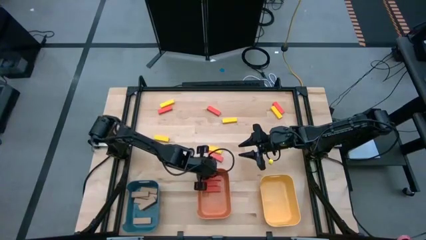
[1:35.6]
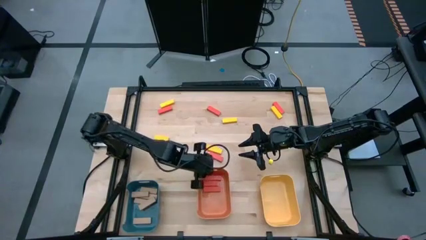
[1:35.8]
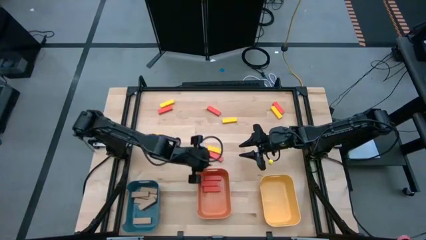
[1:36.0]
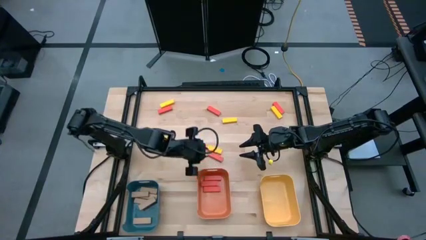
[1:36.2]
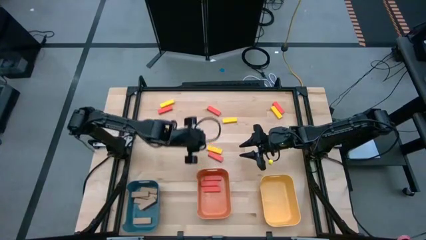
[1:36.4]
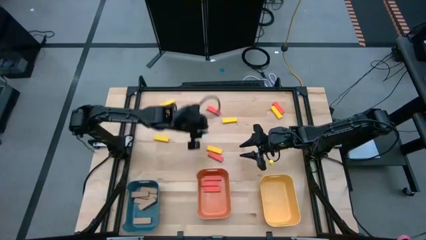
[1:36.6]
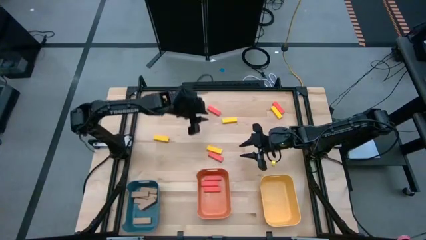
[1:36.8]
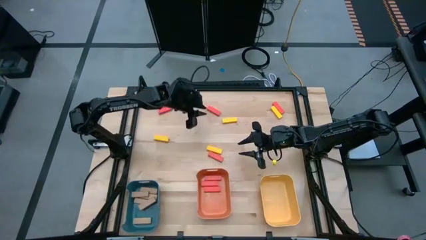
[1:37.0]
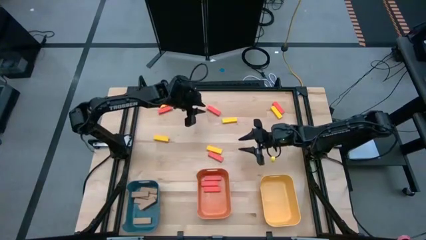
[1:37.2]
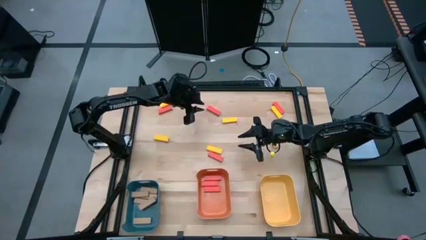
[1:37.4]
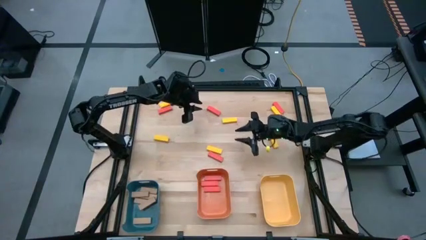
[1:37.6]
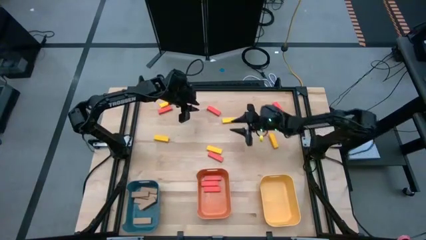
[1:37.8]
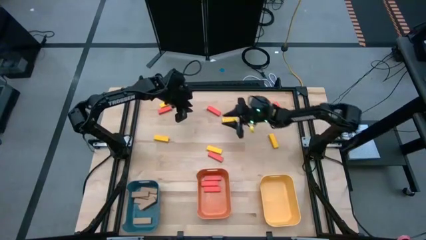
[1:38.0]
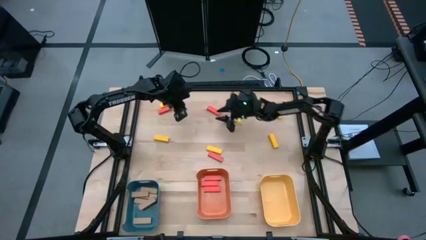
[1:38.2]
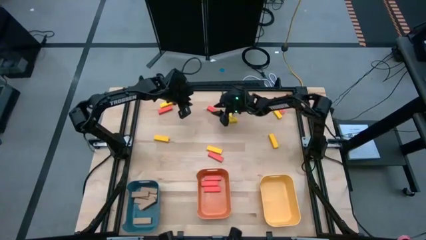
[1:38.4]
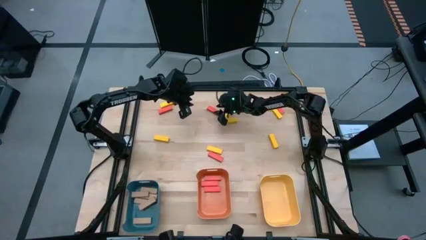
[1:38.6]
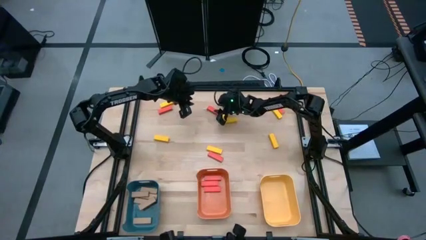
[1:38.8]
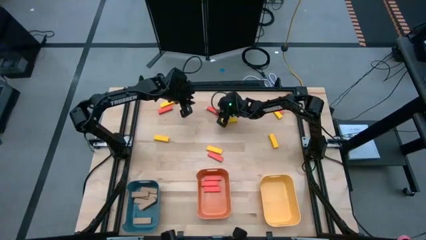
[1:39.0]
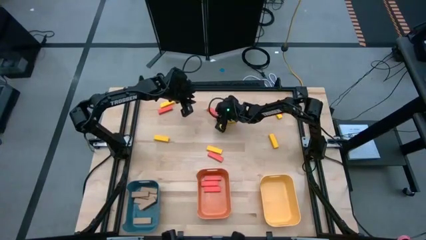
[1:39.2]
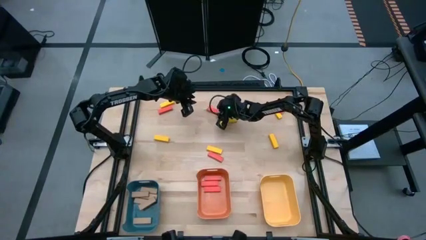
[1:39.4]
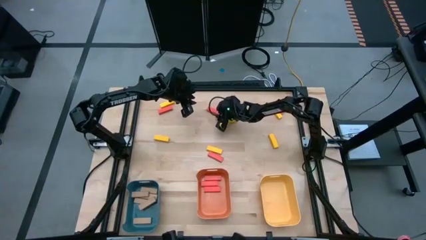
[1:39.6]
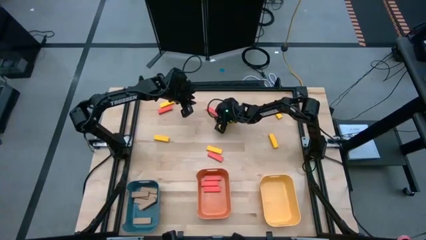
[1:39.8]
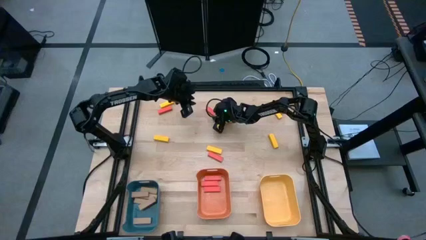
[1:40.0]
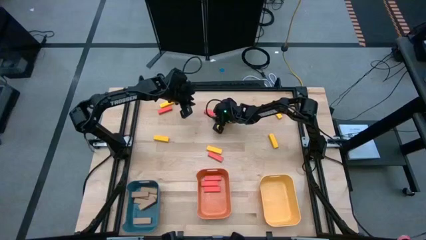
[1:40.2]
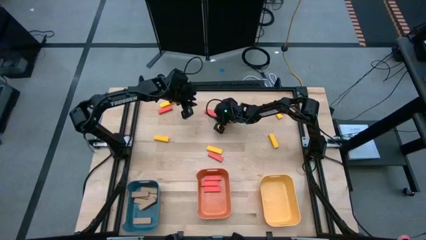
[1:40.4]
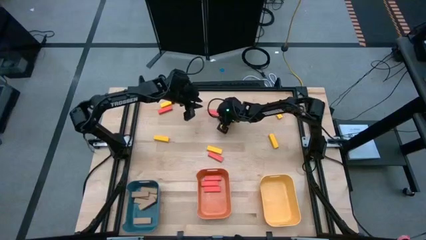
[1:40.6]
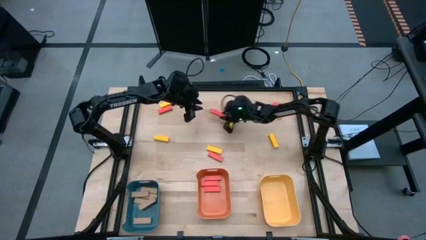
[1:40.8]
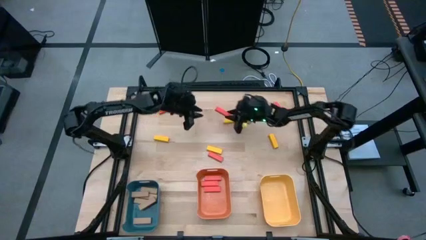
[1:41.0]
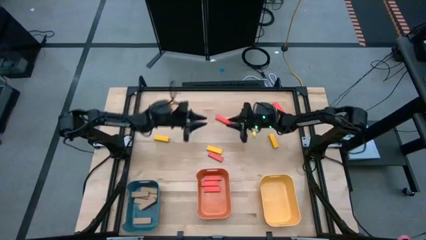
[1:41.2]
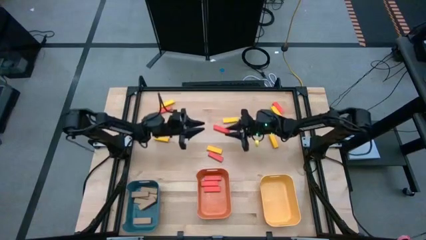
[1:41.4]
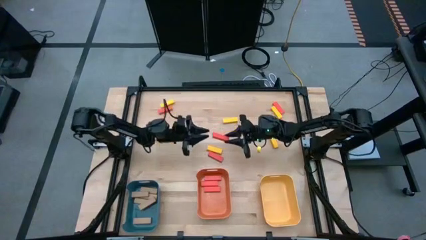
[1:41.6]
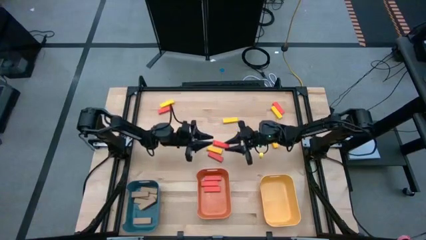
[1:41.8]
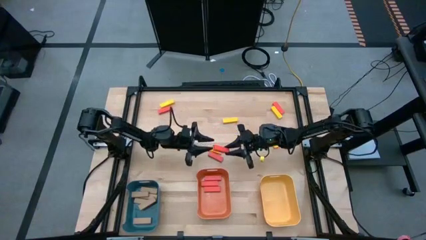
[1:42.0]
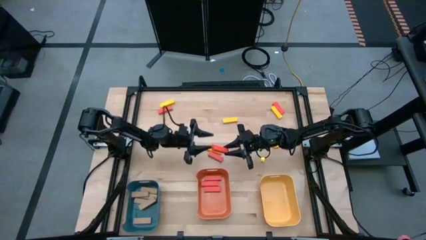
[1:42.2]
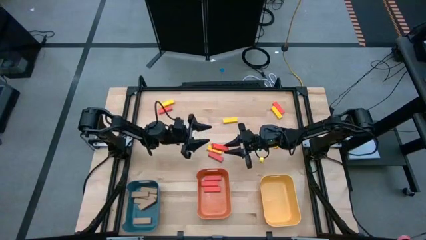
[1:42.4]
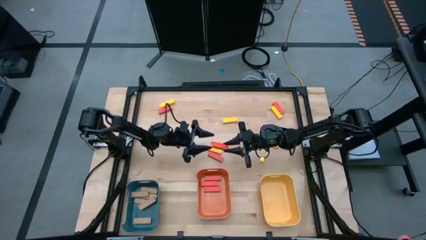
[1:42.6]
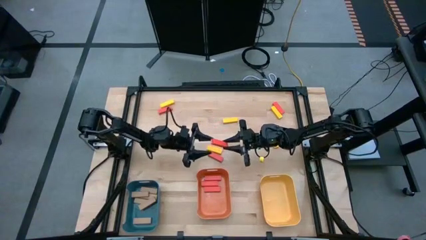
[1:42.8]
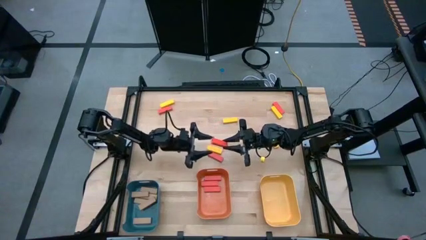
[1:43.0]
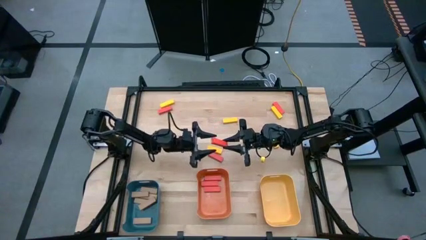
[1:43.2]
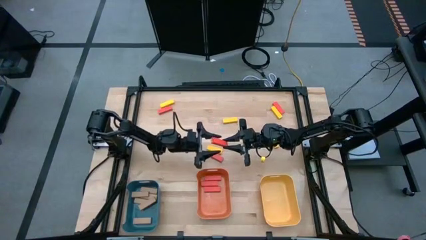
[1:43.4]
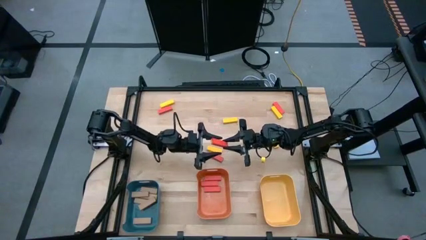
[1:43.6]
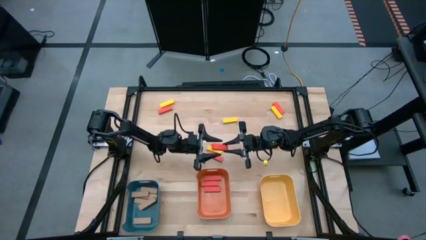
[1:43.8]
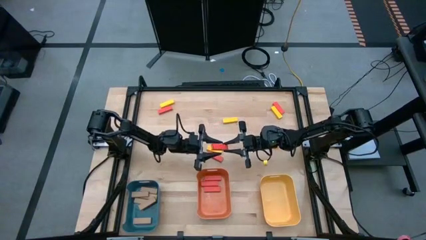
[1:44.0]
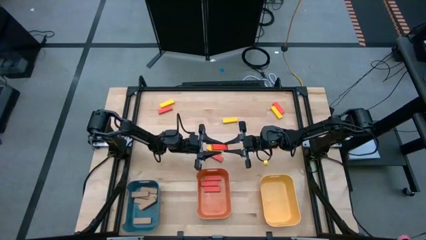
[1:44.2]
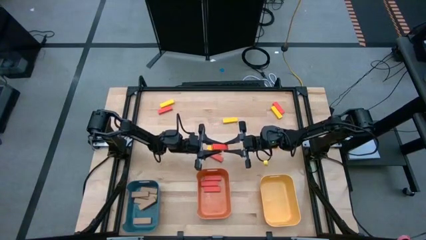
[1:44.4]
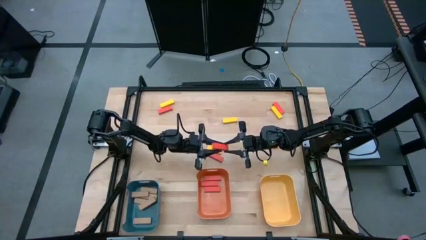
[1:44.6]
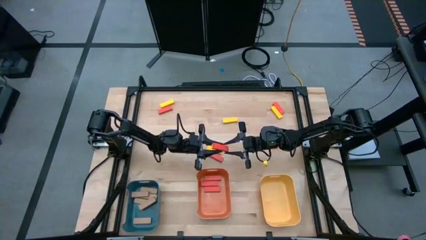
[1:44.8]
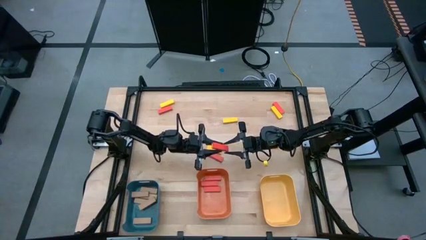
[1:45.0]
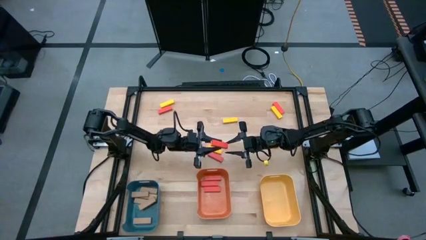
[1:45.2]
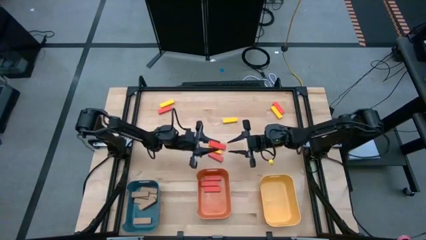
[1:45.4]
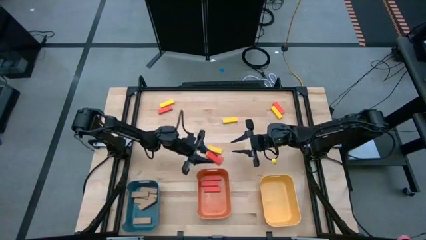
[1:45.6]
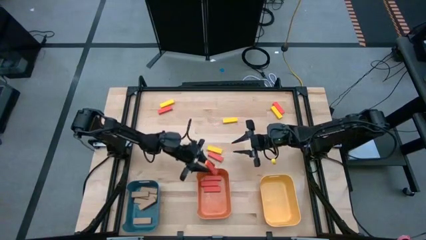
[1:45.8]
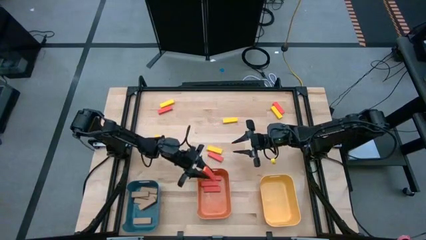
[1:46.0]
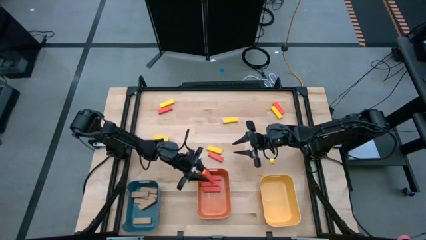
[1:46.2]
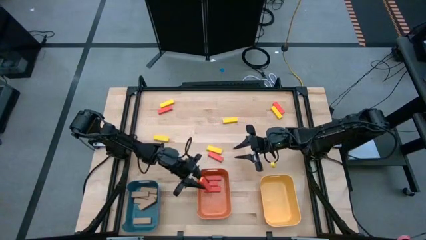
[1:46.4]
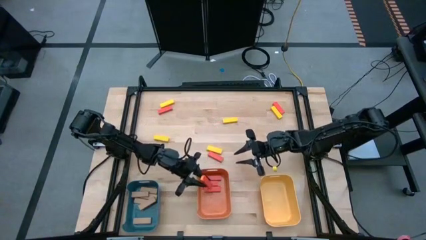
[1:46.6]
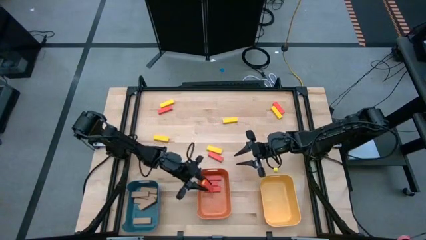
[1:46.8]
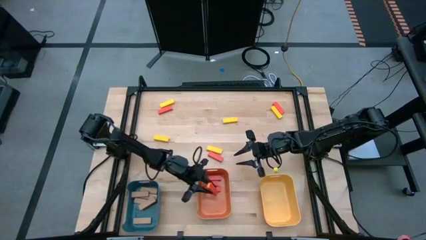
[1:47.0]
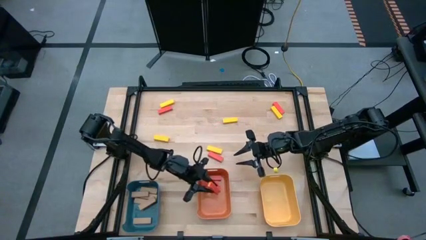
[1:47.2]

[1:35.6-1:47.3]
Task: Sort blocks
Put the top center orange block into the orange bin

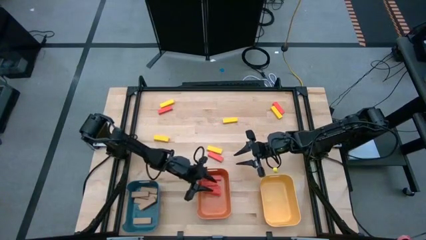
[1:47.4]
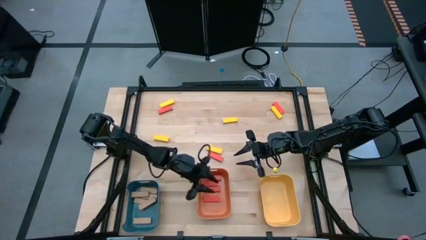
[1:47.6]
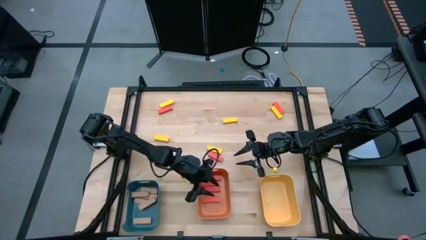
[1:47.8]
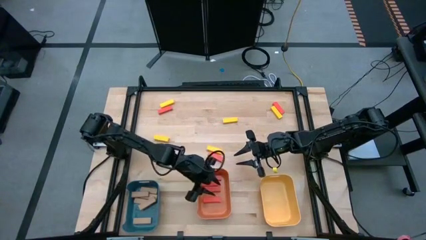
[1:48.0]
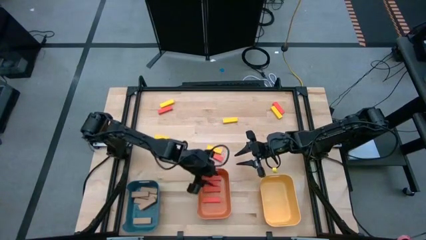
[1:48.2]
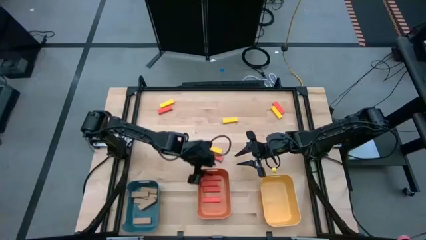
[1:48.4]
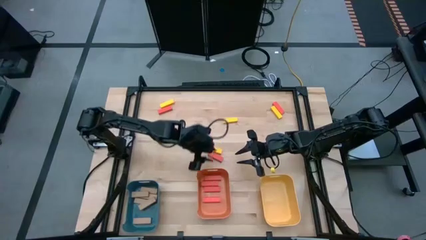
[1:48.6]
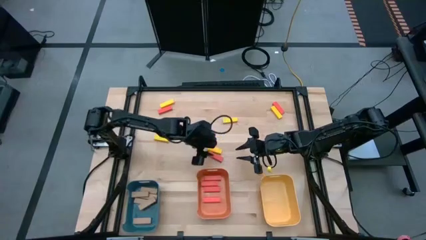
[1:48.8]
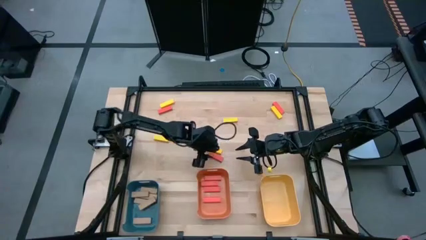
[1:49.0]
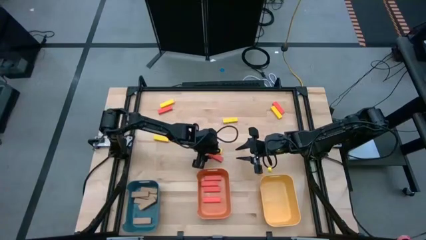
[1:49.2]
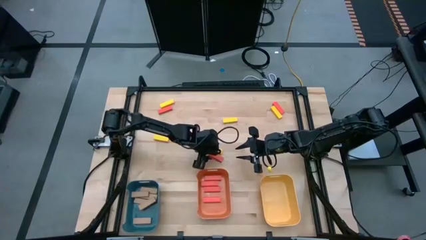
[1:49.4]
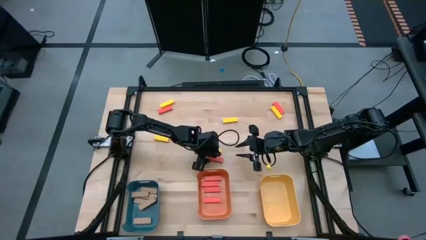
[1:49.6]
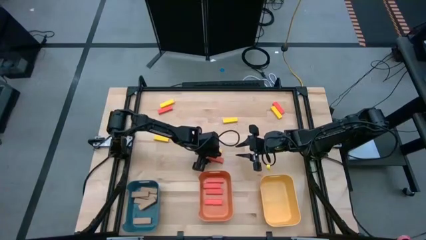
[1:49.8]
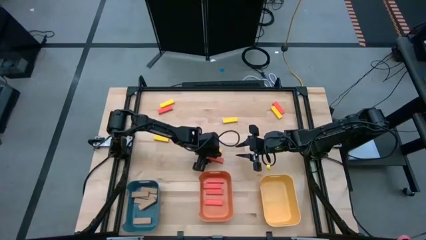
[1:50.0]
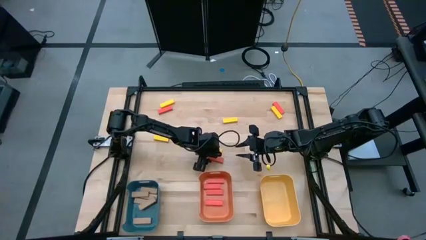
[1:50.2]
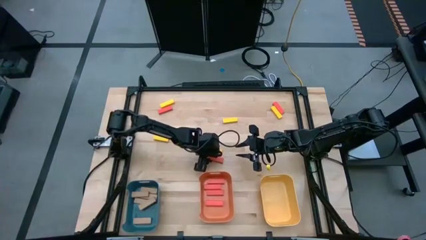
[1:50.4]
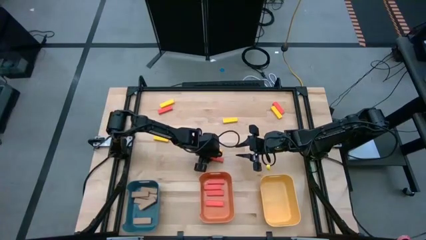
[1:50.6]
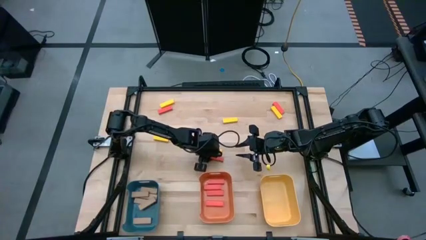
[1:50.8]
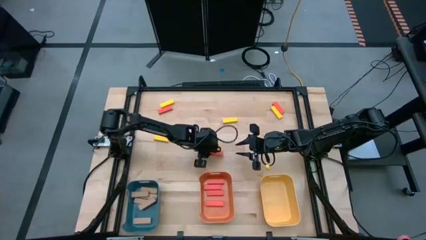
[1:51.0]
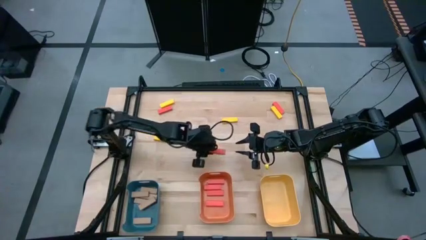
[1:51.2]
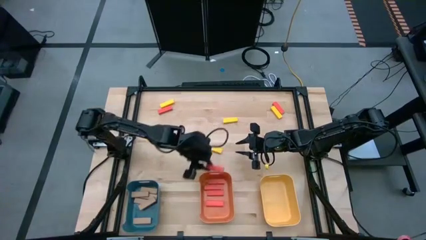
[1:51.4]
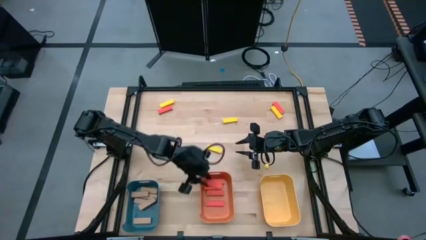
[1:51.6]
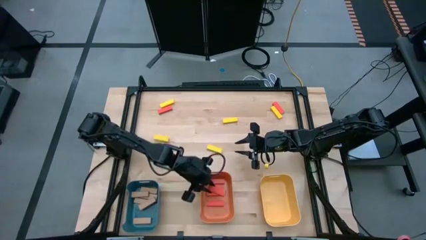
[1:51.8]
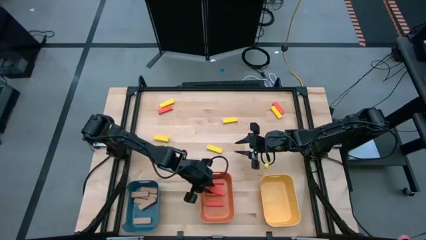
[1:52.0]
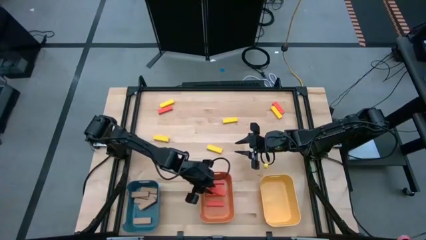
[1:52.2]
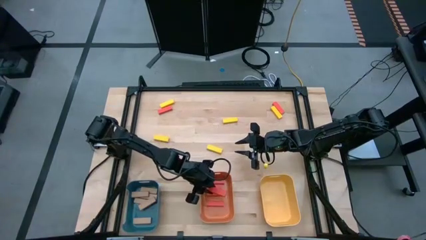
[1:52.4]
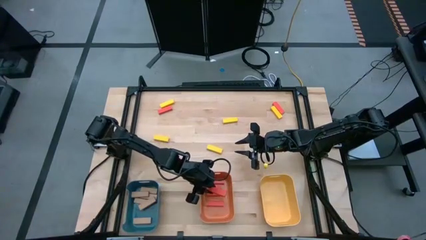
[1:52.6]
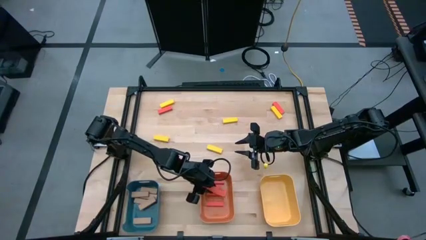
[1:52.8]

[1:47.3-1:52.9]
Put the bottom middle orange block into the orange bin
